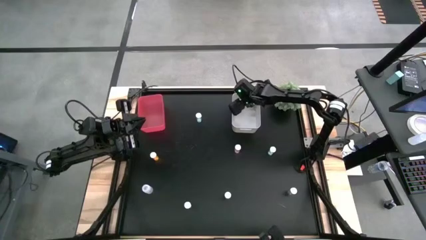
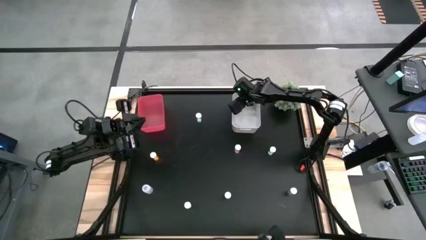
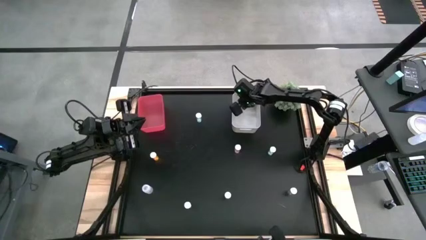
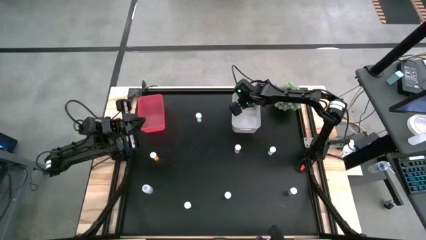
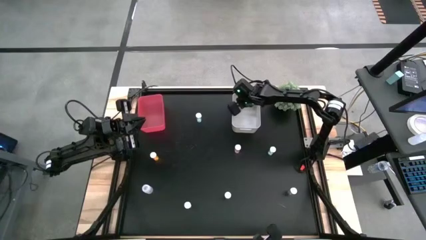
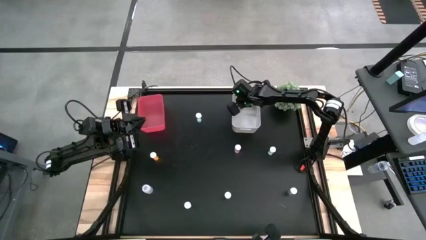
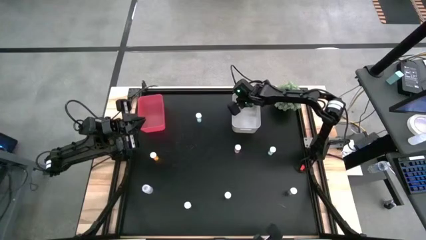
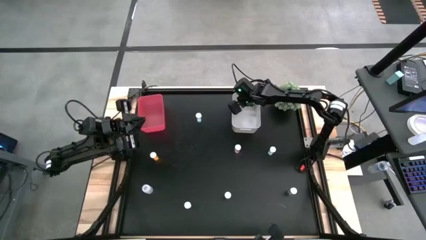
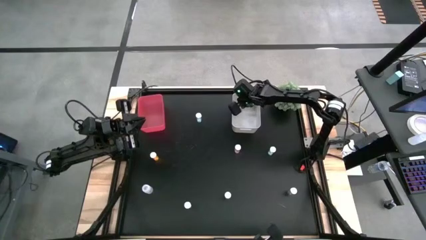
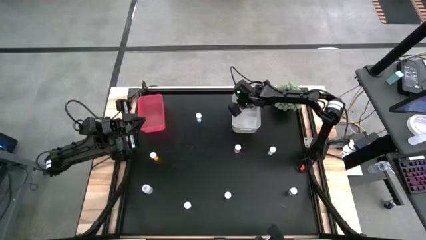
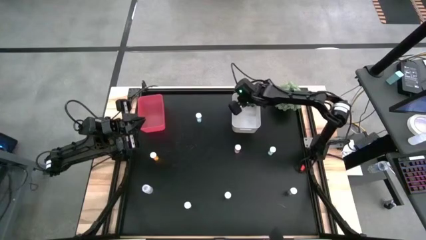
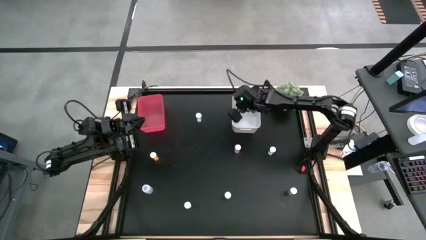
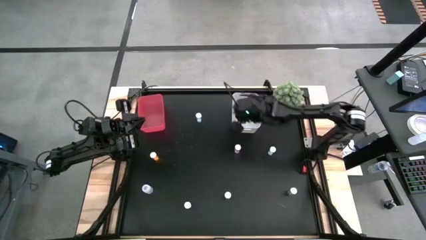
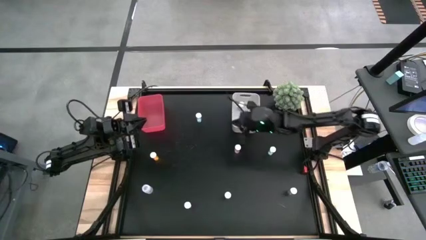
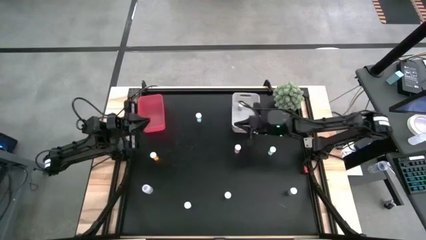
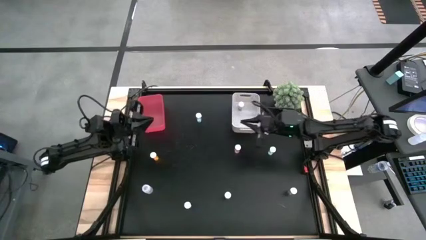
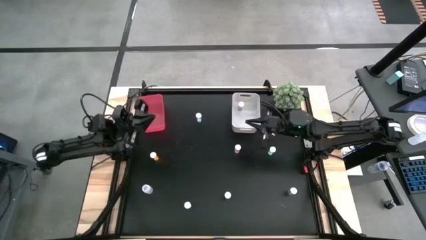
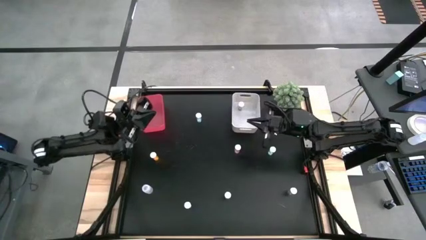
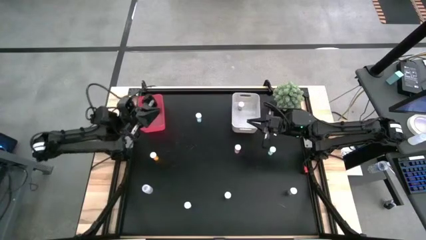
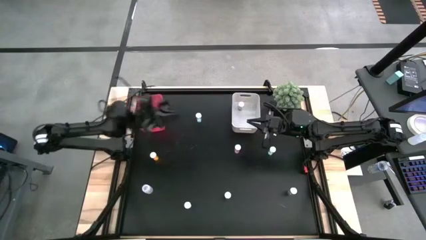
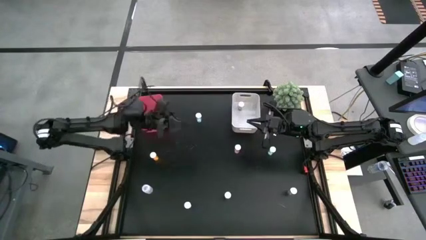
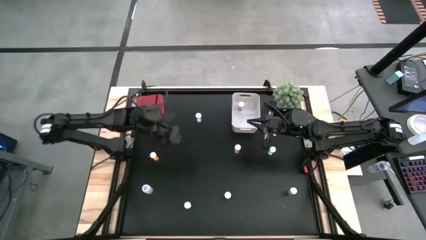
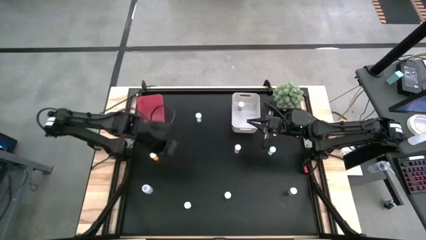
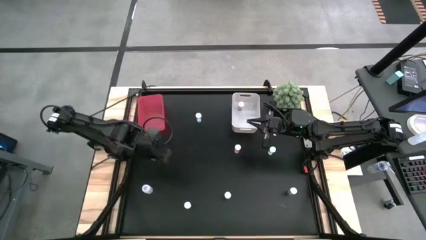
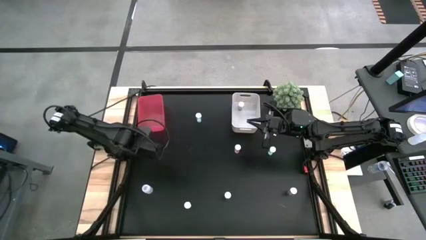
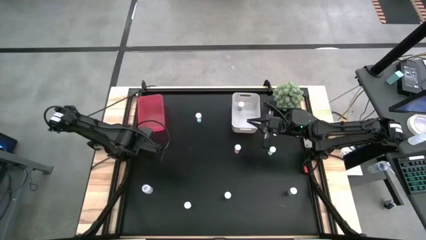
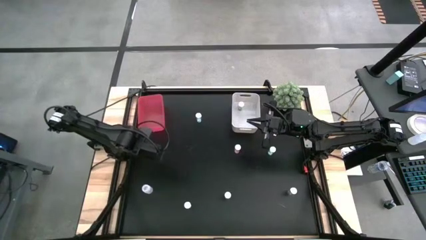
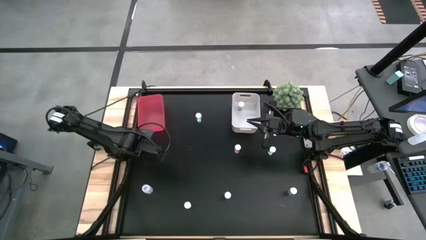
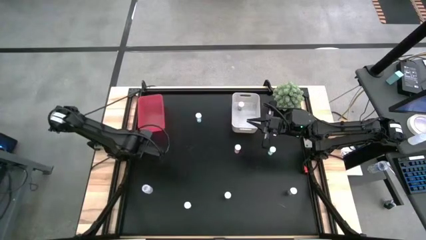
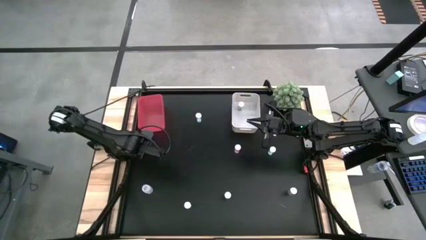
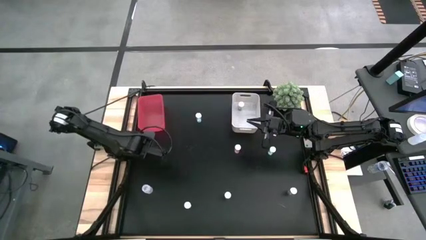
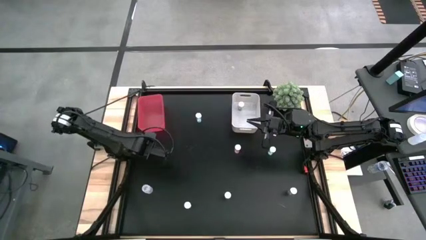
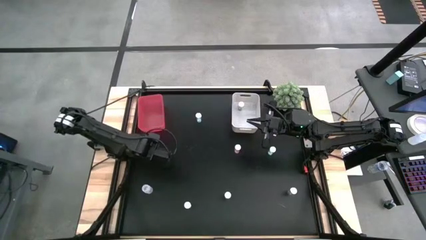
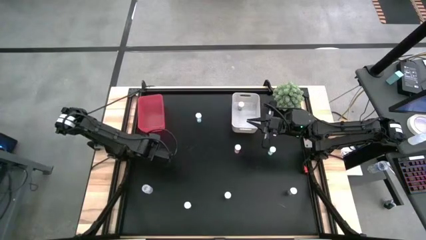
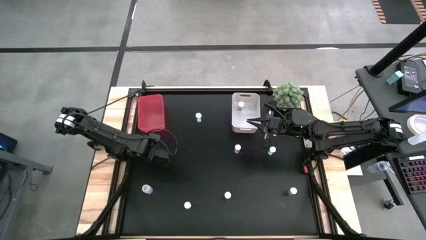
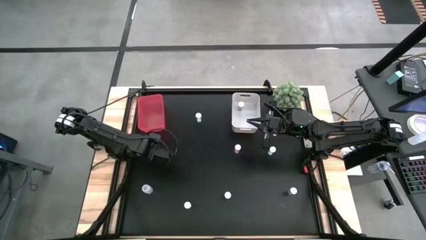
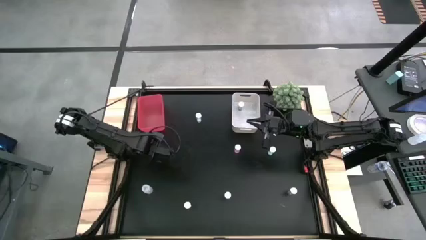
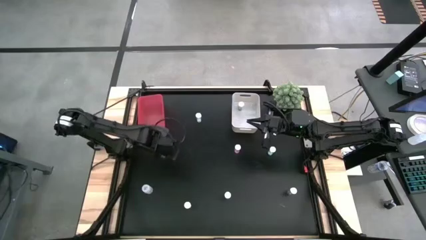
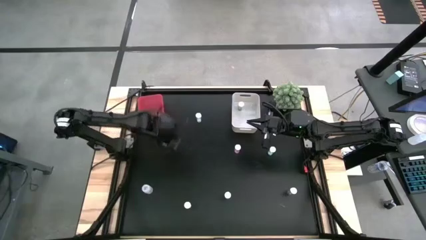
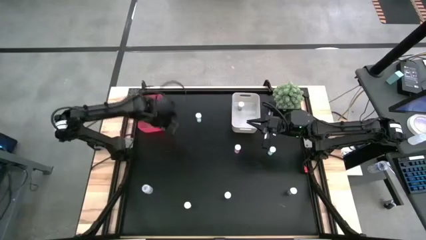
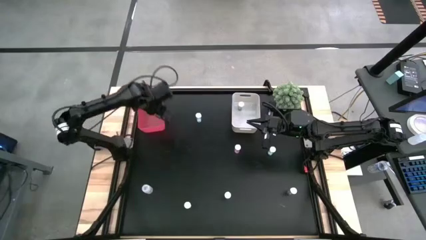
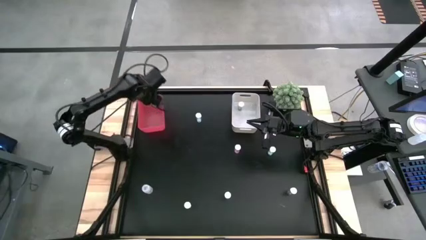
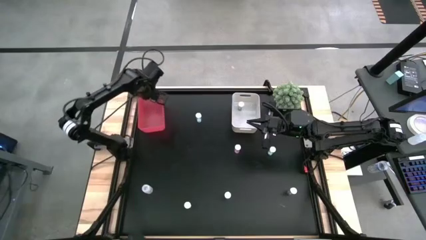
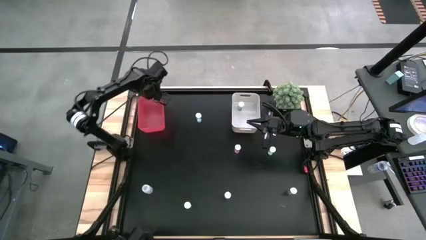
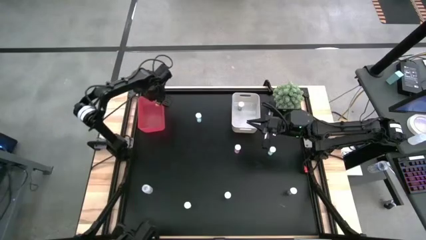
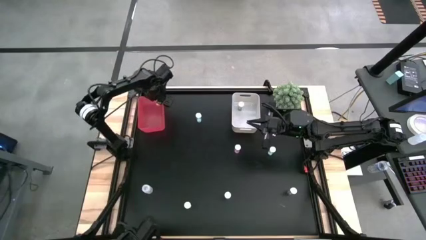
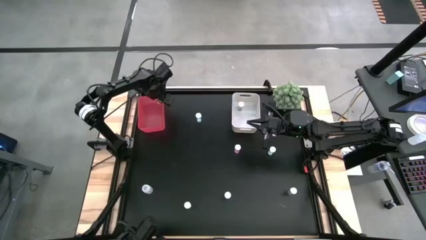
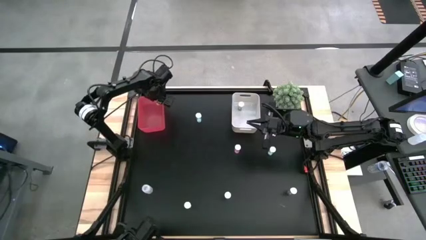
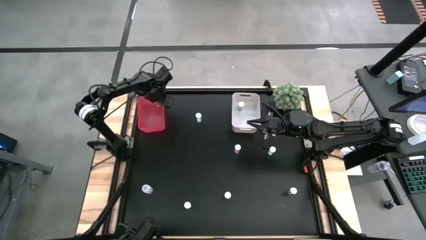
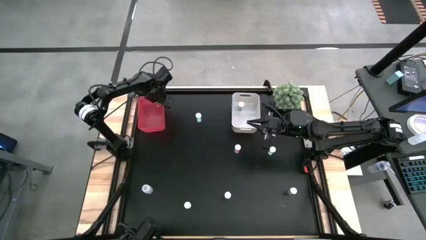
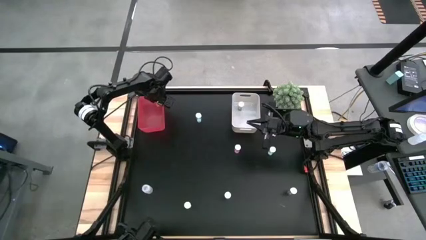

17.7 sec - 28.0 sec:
Task: Pick and place medicine bottles into bin by pill shape (circle, oval)
Put the orange tablet bottle into the red bin

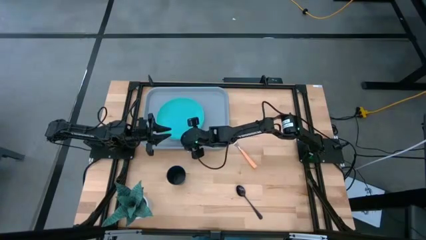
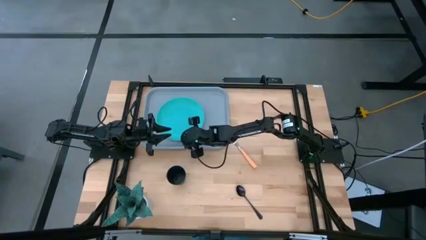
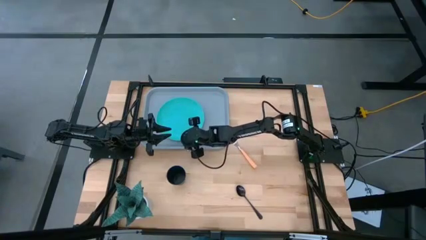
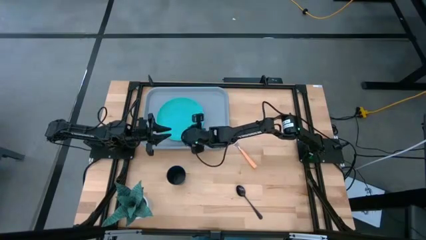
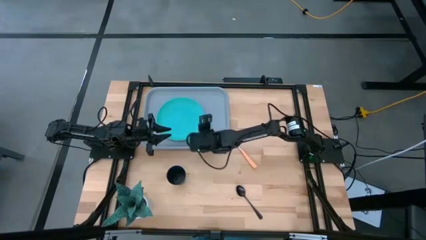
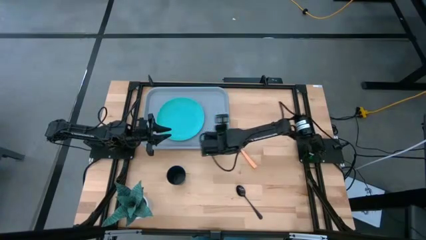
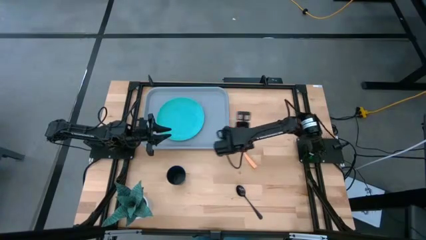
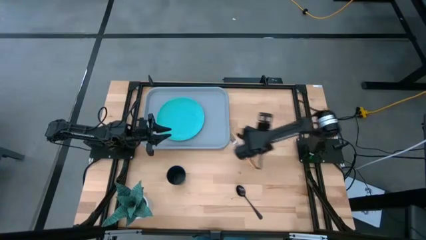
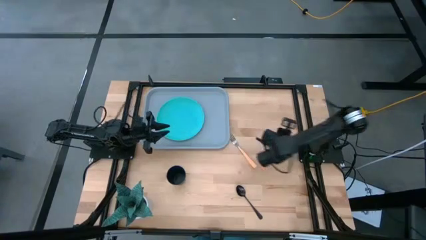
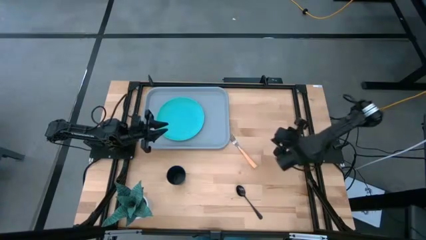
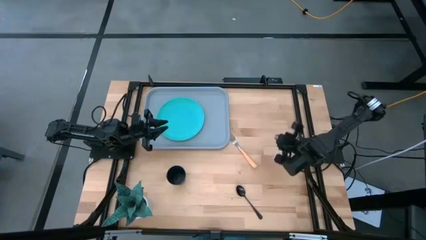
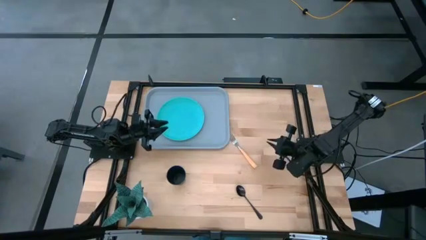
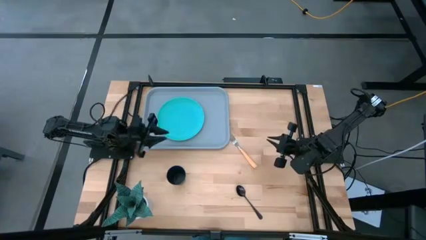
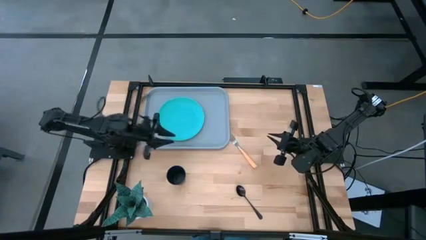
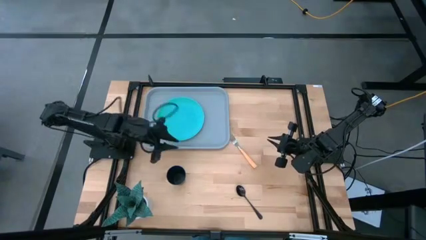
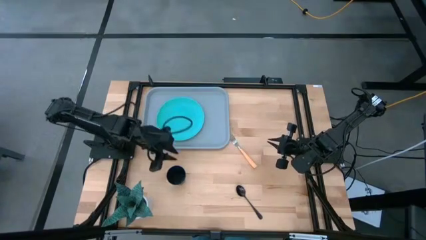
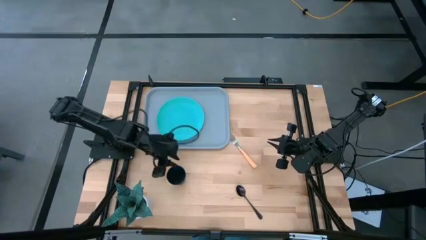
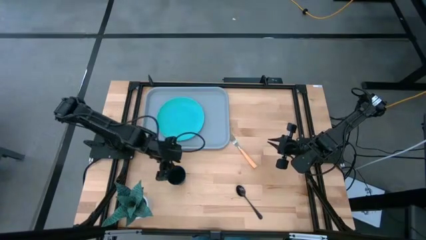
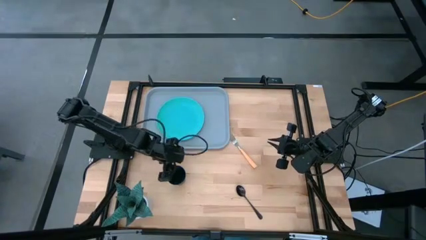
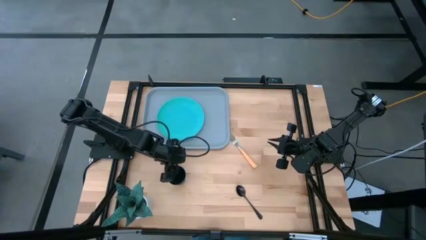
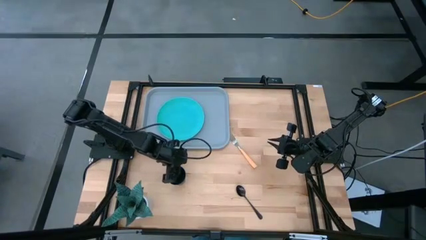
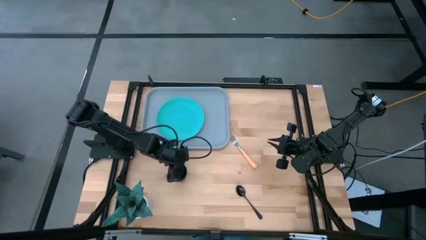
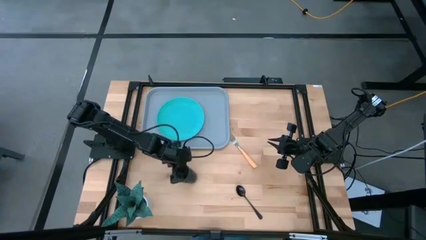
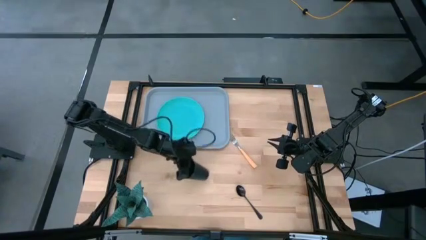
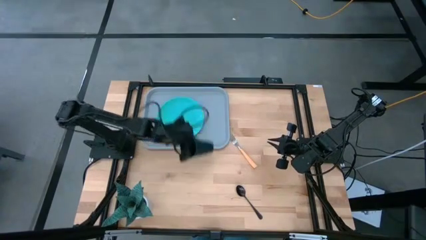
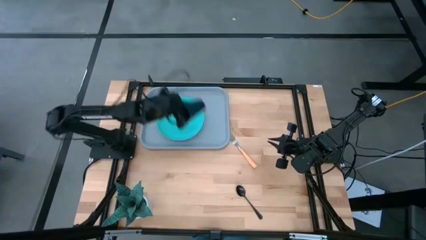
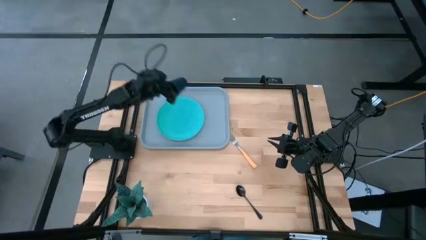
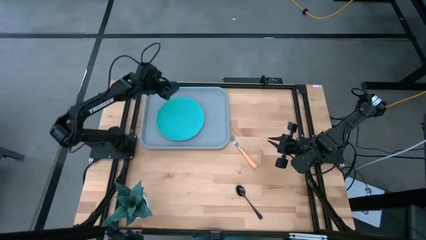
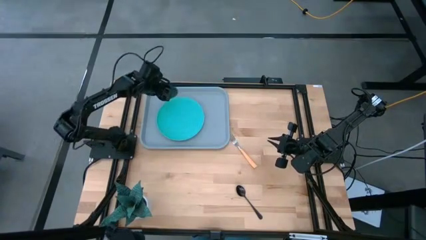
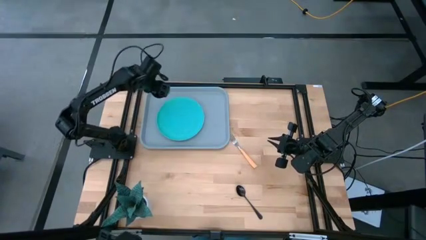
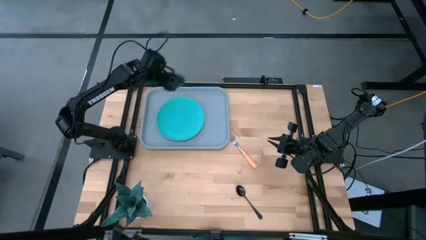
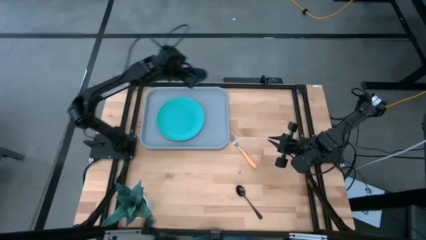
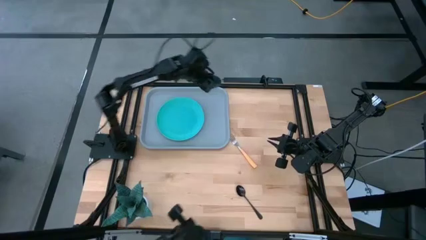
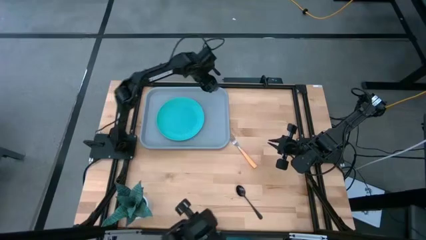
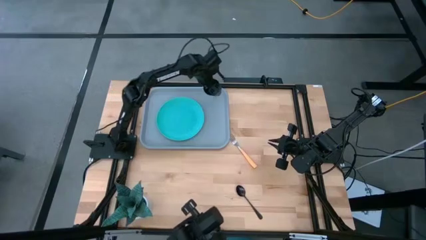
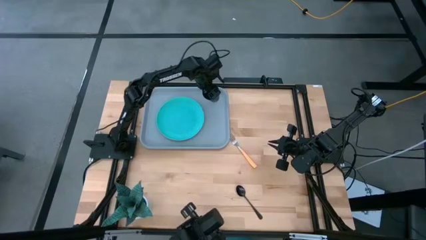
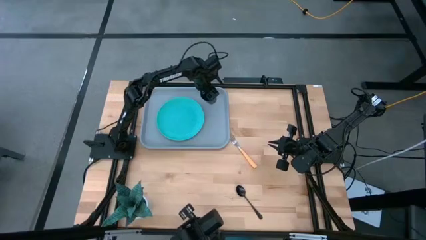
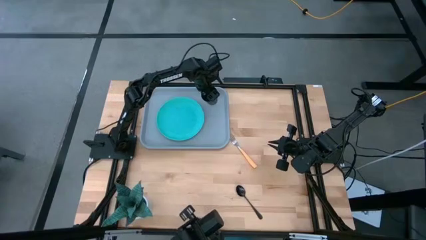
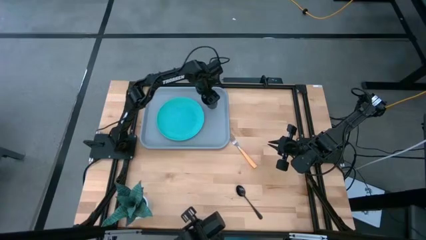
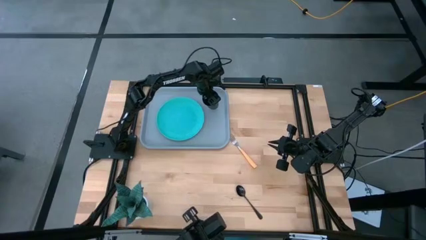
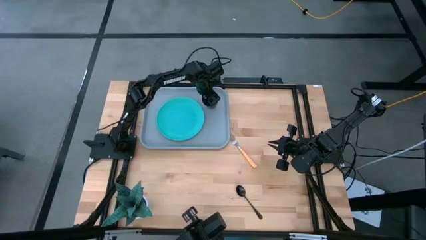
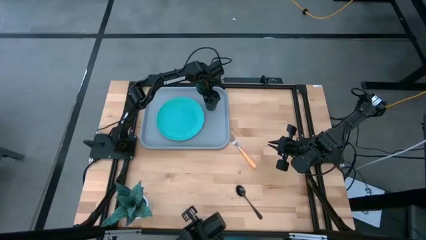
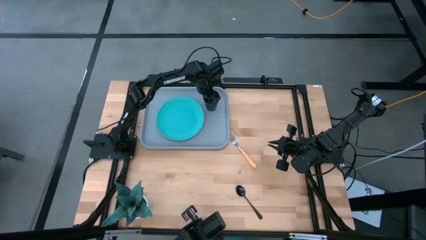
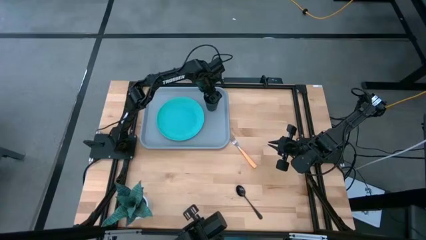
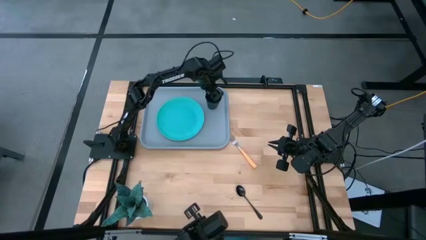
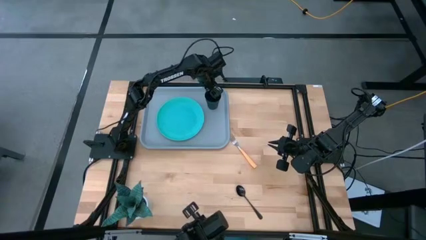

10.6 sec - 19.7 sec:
Task: Pick and place plate/cup/fork/spoon on tray
Put the black cup on the top right of the serving tray
